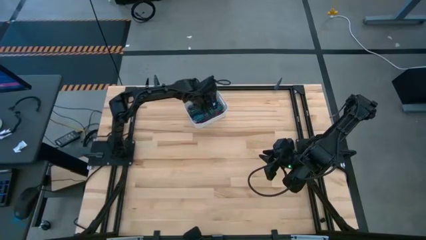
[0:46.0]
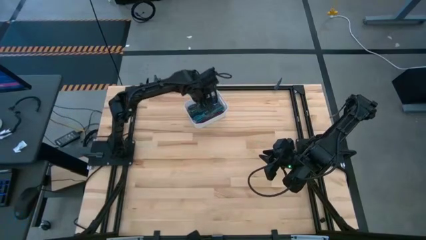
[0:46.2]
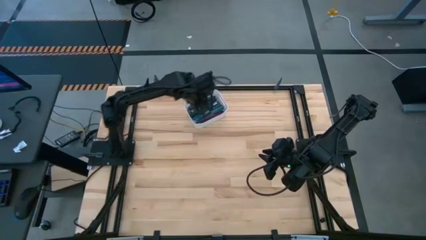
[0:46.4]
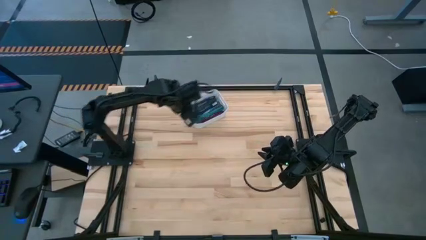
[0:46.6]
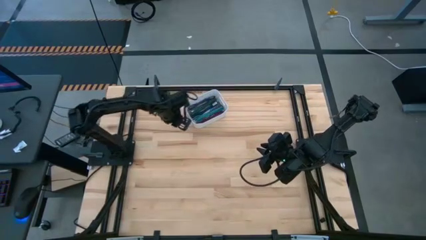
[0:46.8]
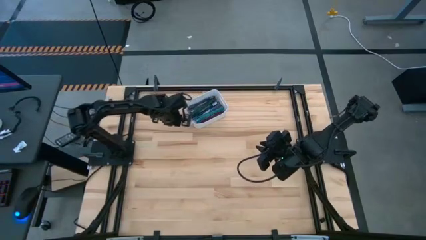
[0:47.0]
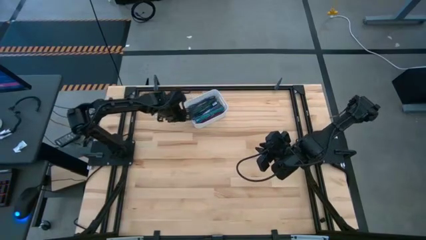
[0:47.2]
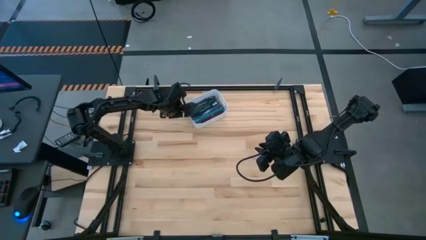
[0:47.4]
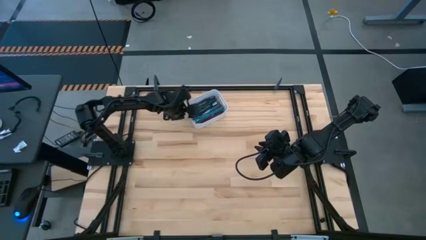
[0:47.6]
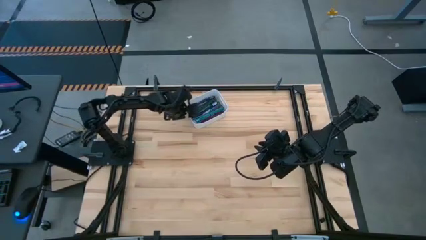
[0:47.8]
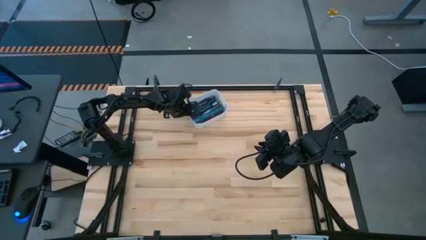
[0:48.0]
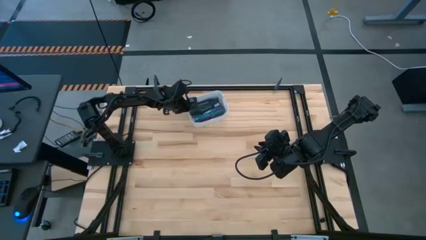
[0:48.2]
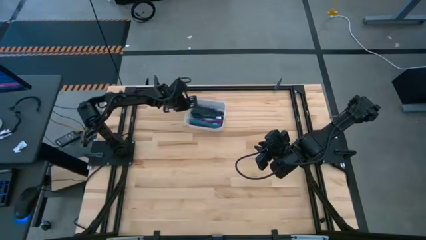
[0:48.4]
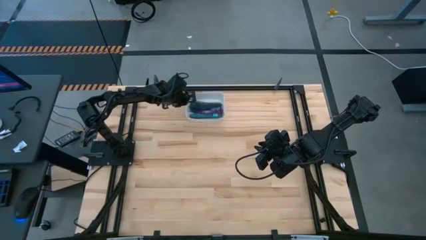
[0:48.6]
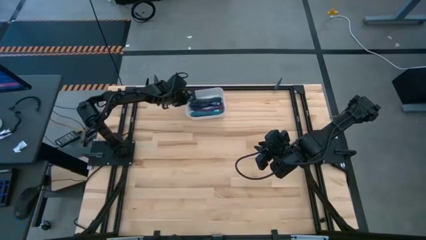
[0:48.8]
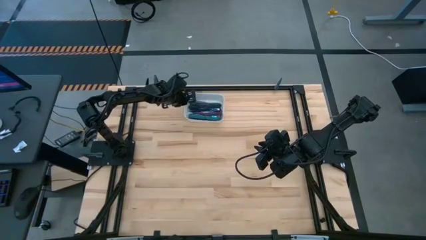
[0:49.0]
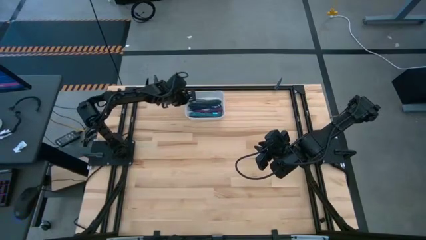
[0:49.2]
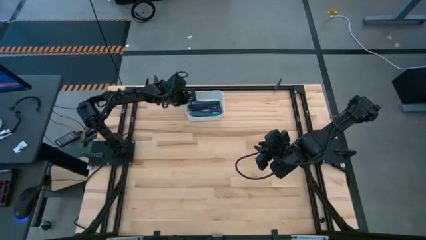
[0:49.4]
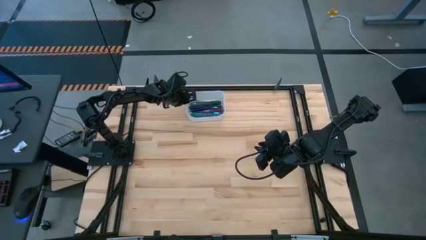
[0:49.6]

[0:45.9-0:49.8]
Task: Pick and place USB-C Cables
Adjust the white bin

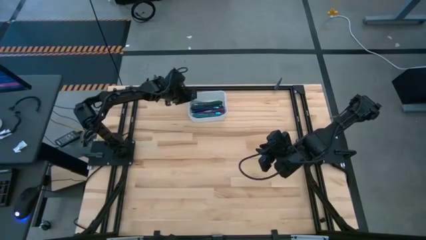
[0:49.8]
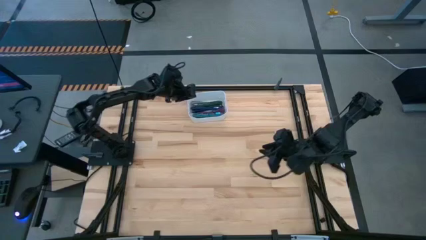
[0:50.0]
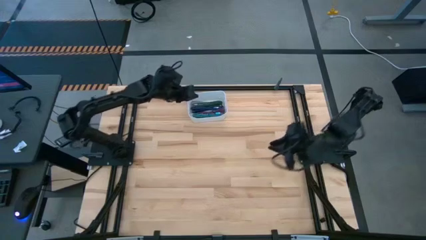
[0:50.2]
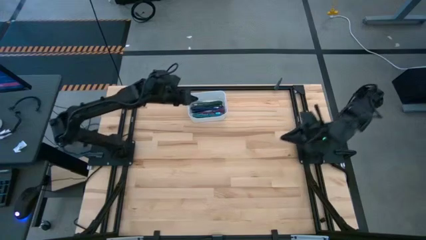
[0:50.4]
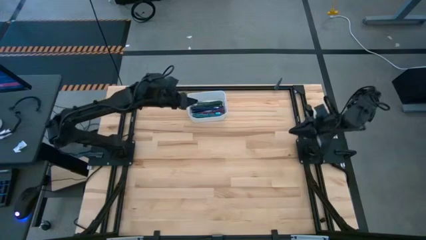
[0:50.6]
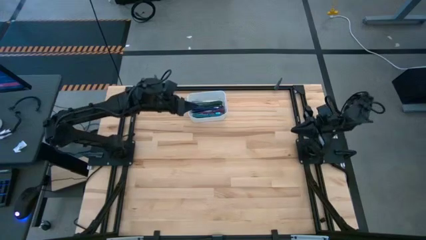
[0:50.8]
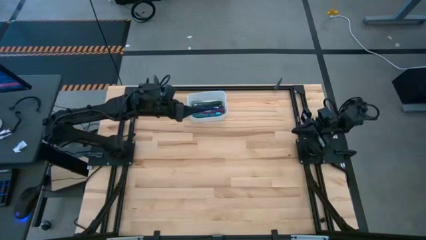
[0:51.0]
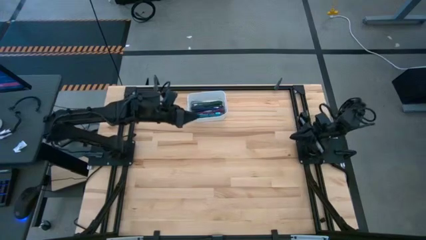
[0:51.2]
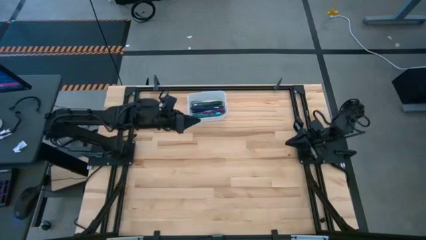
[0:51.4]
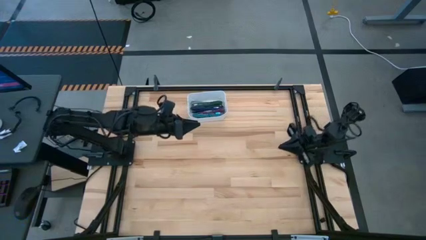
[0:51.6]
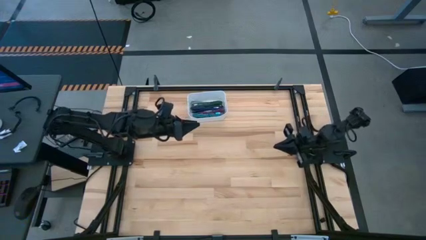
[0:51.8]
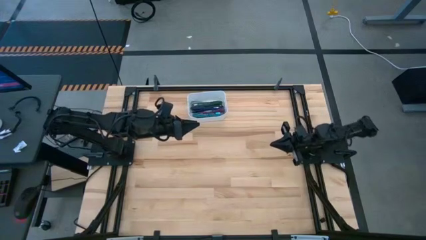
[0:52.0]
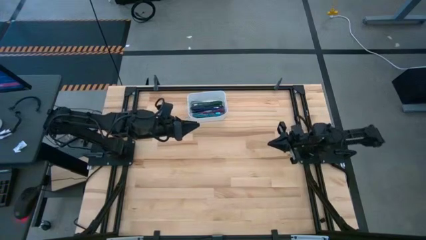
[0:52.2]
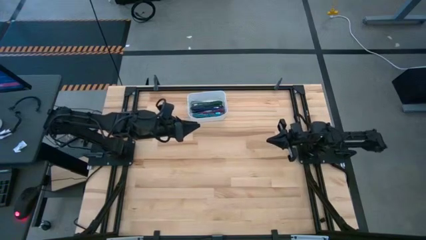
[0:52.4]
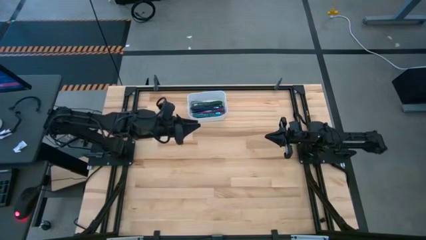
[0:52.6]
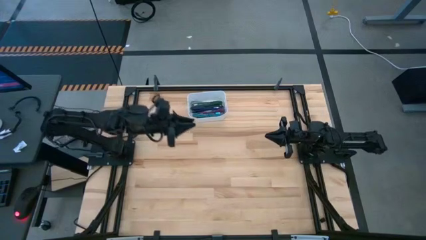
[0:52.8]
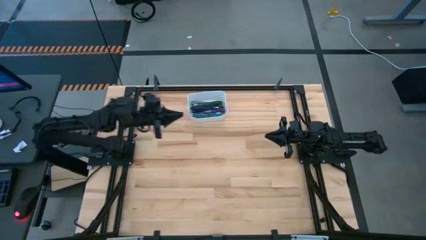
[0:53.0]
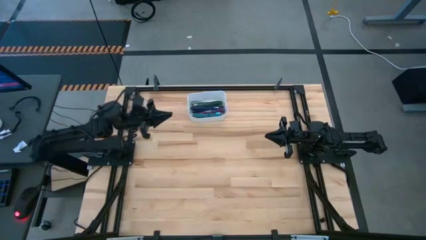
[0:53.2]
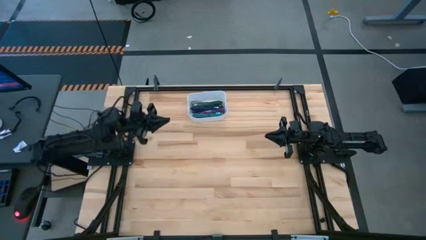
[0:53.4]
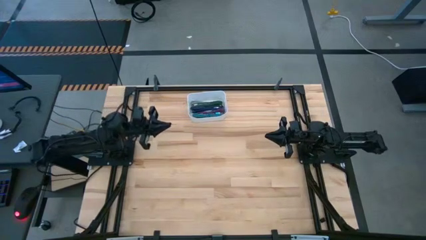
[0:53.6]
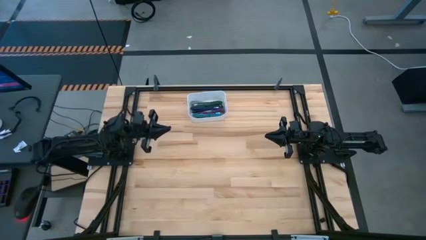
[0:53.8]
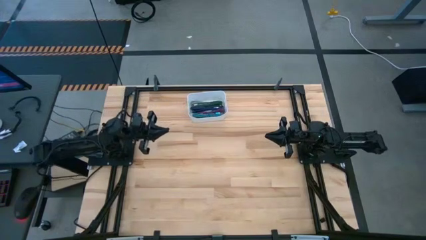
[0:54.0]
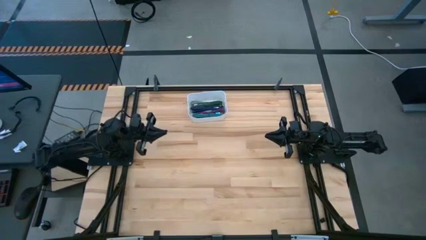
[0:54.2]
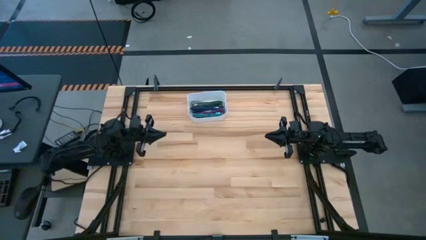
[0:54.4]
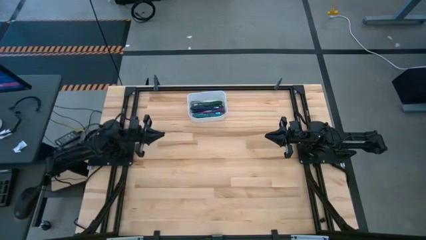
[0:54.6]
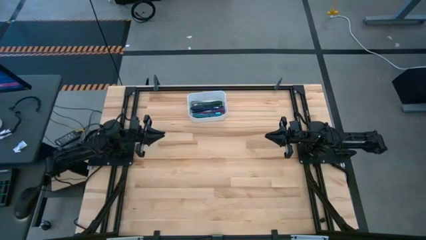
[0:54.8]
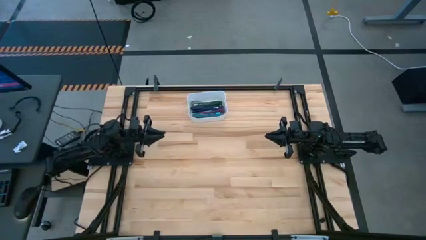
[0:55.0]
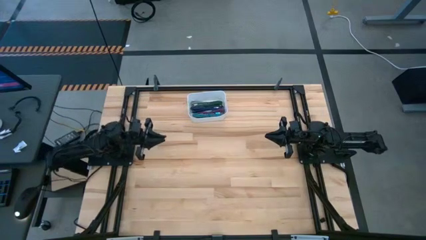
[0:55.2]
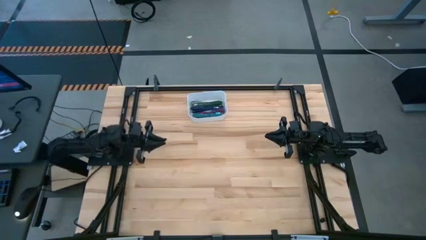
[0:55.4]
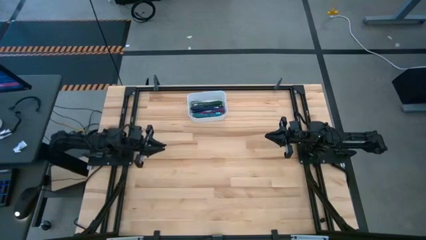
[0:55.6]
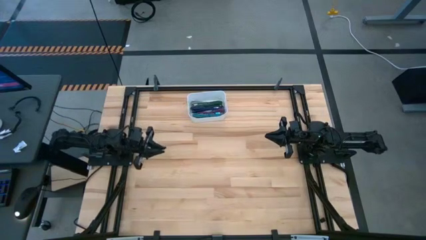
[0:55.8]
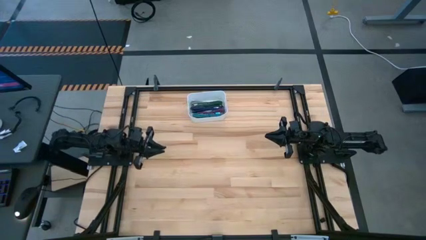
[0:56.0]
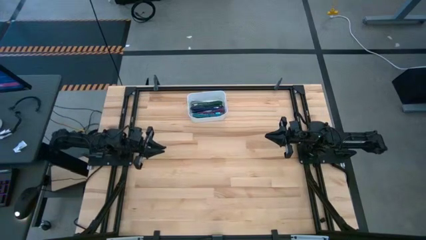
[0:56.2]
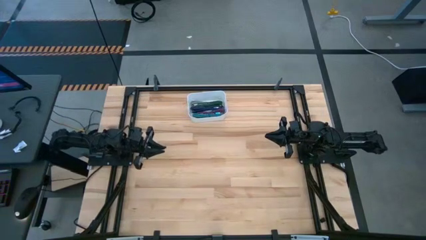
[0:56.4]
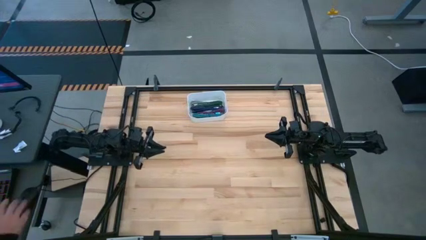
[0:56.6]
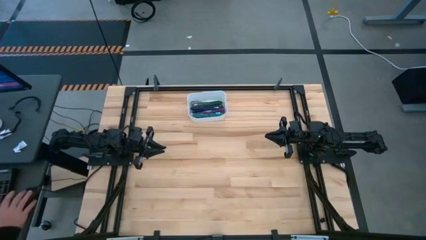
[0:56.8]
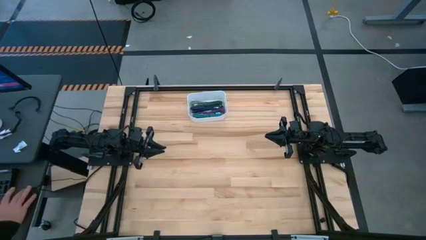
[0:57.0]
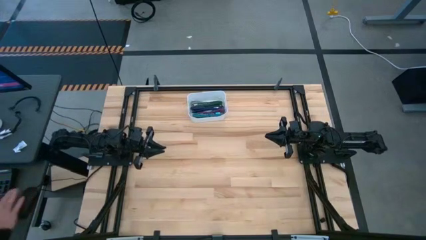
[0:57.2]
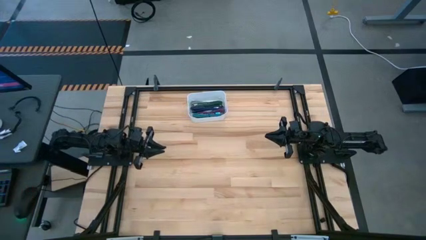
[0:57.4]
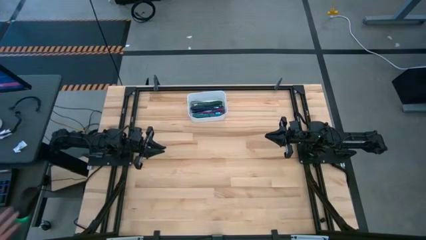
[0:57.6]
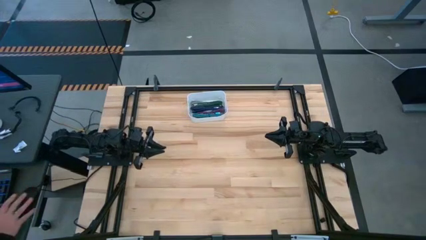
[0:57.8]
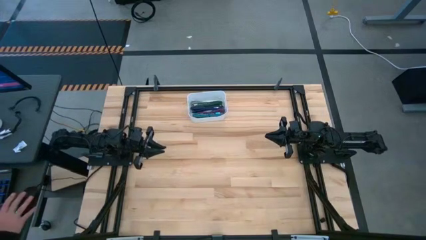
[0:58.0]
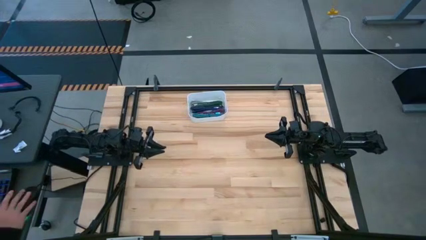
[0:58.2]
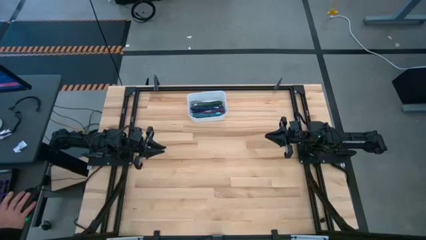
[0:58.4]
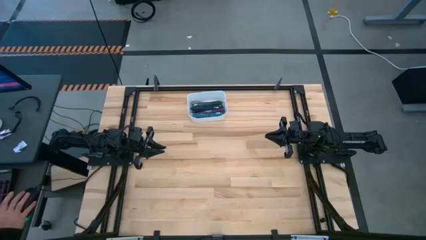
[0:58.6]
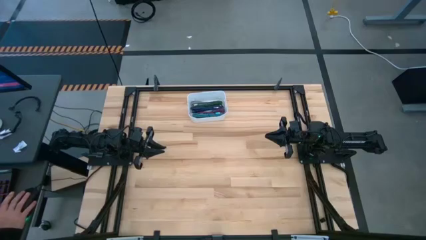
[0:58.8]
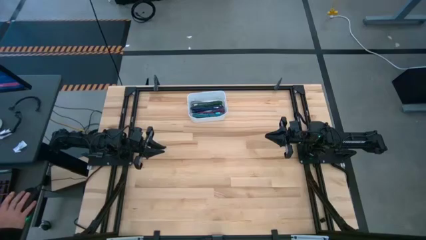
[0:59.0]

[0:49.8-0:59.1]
Return to Home Position

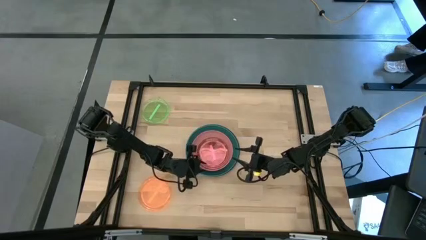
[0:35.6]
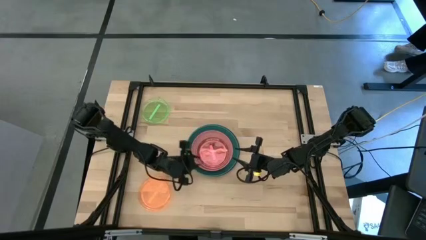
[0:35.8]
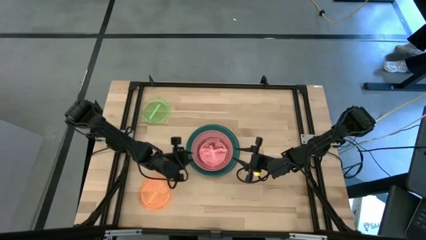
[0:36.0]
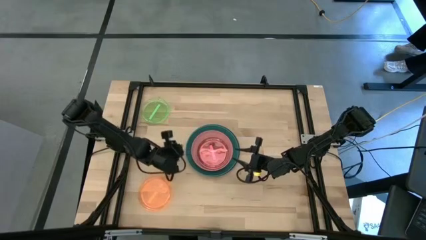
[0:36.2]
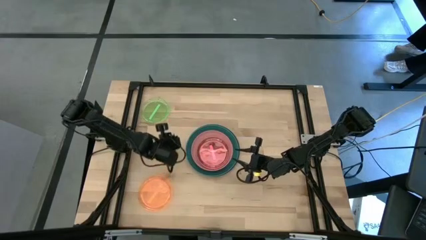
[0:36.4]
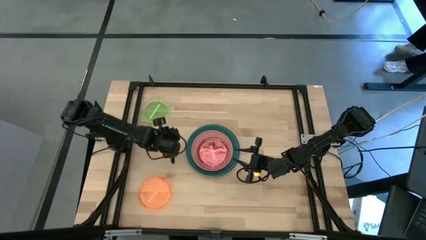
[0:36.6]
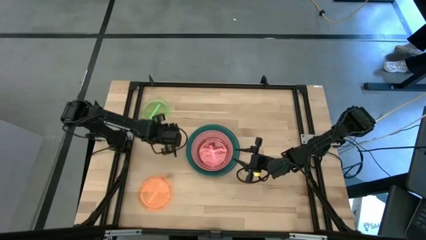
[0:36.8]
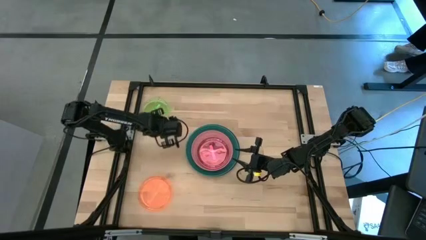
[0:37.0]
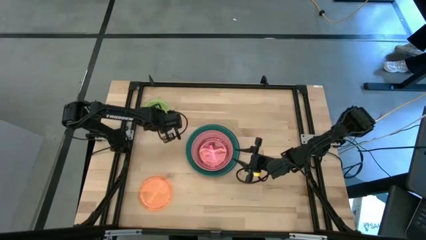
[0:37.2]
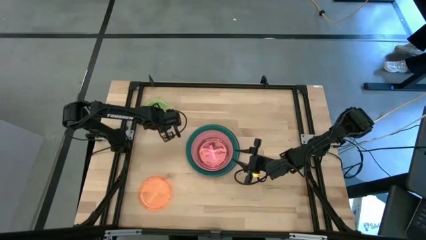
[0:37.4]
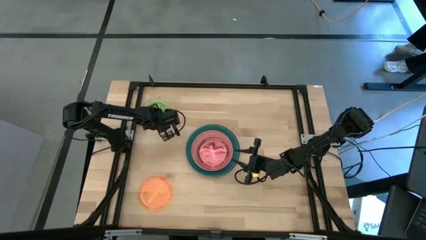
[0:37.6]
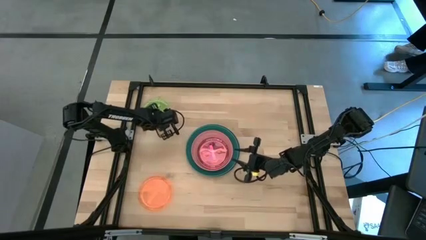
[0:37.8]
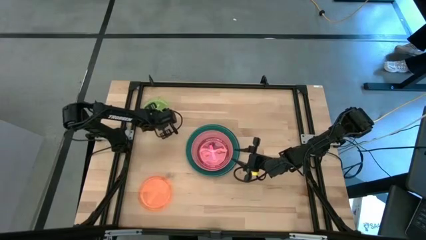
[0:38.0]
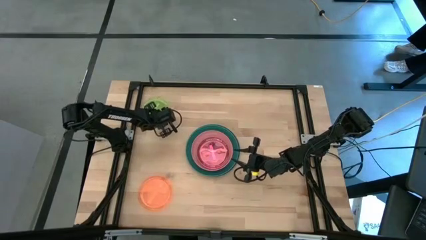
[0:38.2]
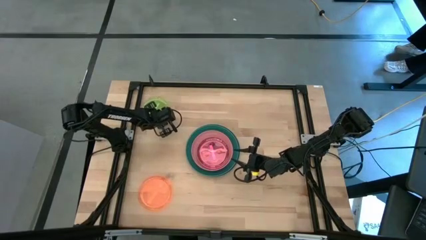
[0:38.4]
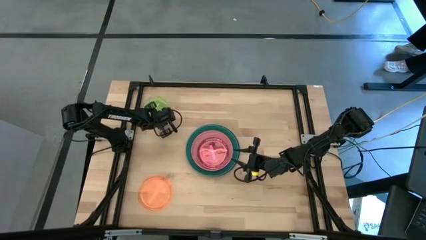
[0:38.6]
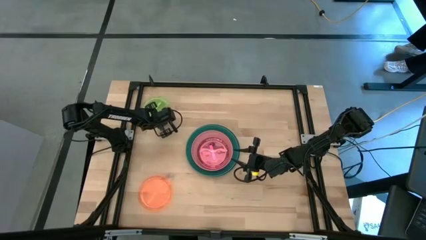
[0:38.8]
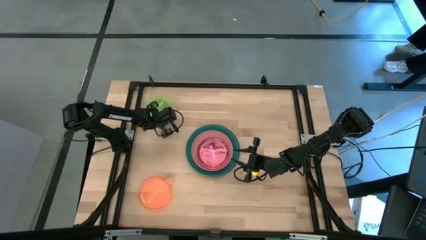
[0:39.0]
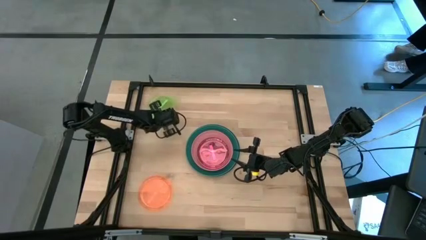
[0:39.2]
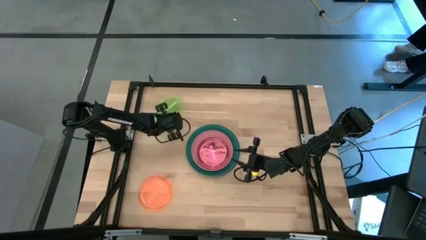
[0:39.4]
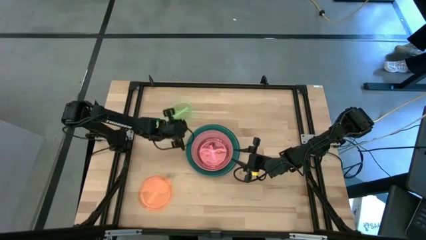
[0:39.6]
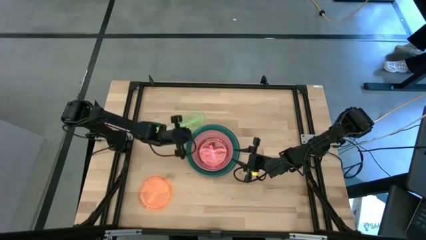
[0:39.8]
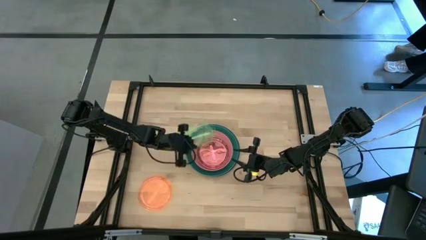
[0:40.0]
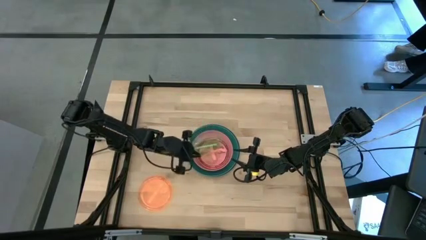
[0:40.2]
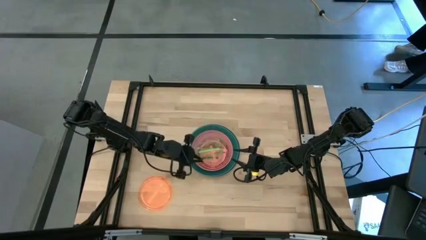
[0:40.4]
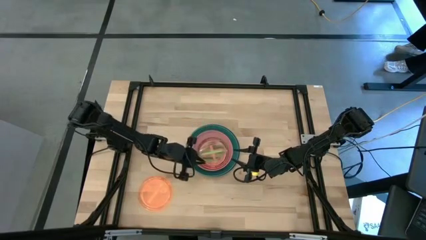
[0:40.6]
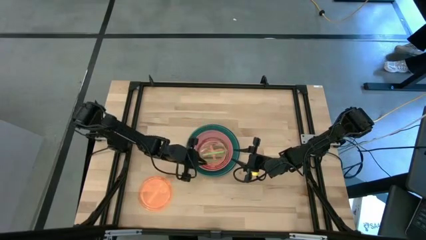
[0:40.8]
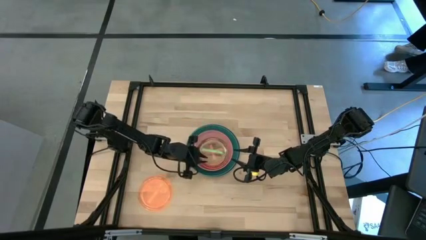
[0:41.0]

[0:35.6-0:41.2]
Task: Stack plastic plates
Stack the light green plate on top of the light pink plate
